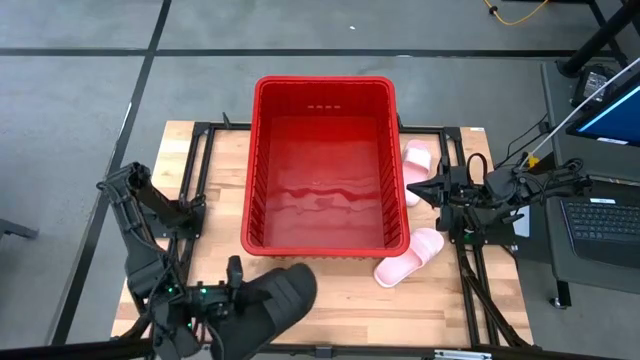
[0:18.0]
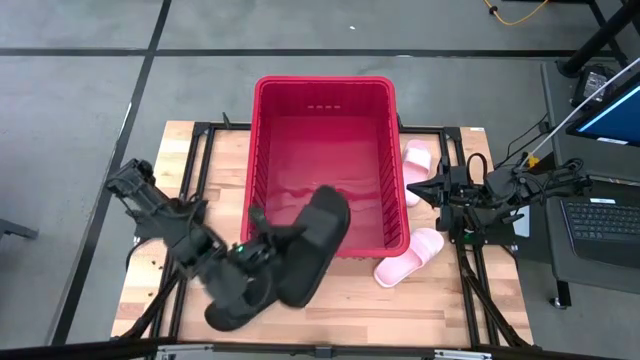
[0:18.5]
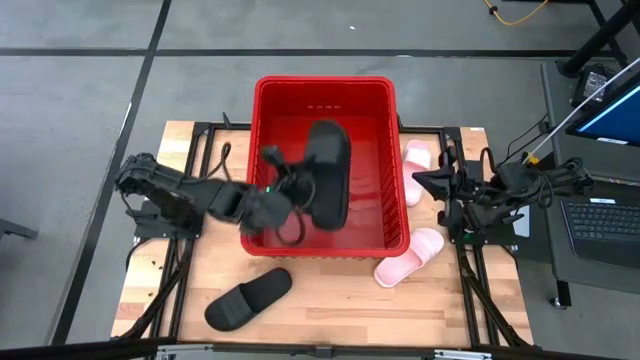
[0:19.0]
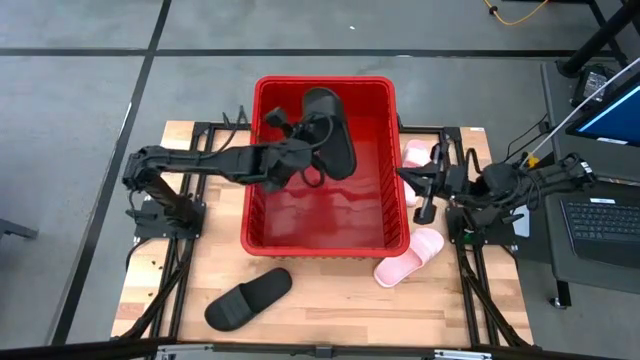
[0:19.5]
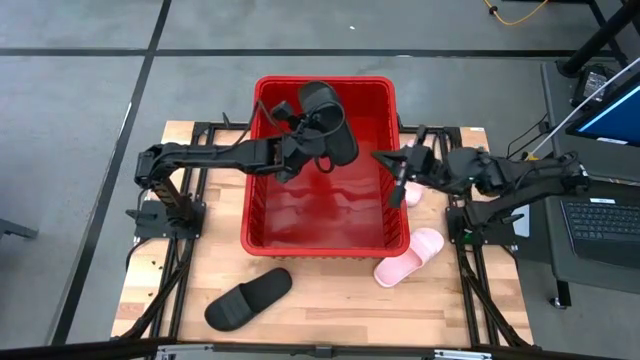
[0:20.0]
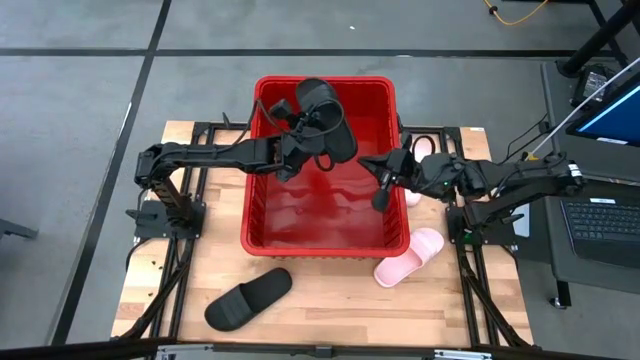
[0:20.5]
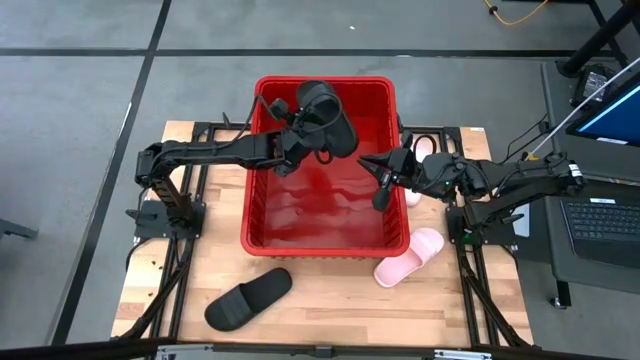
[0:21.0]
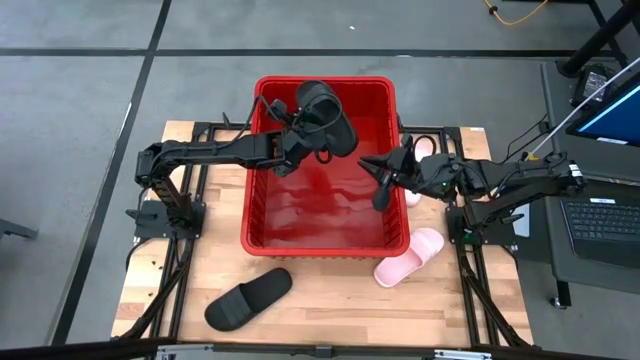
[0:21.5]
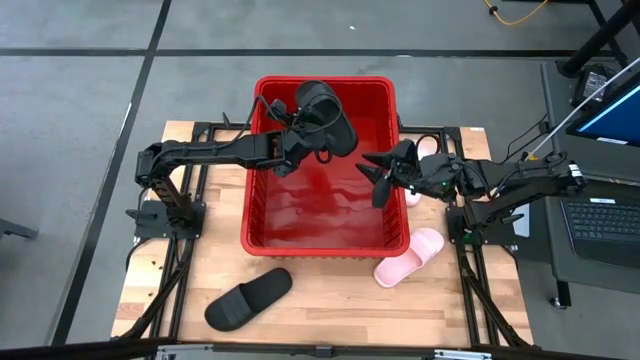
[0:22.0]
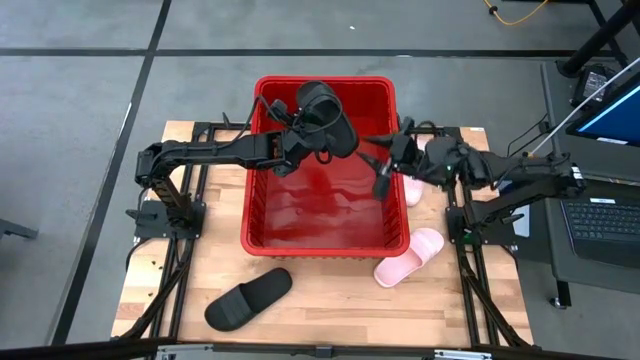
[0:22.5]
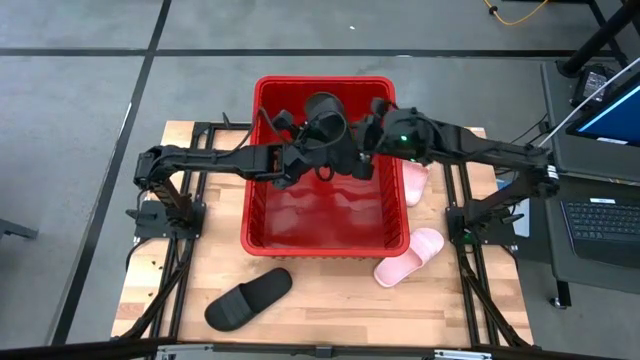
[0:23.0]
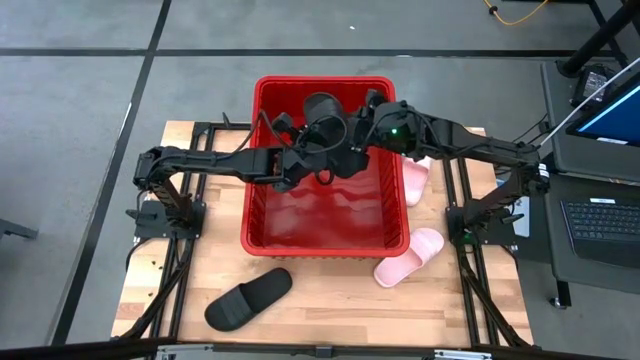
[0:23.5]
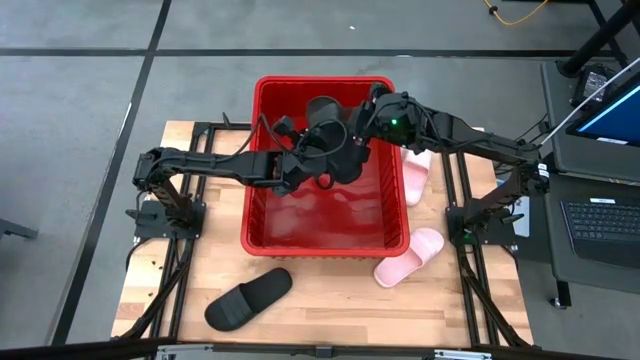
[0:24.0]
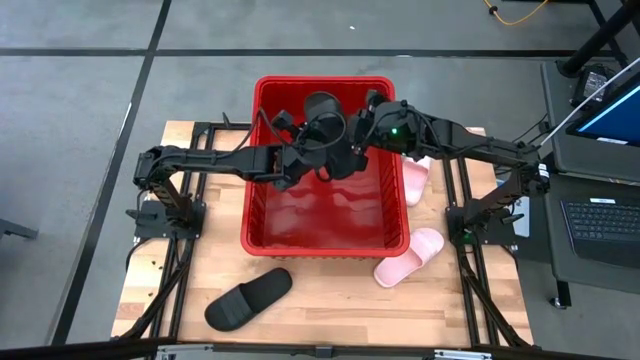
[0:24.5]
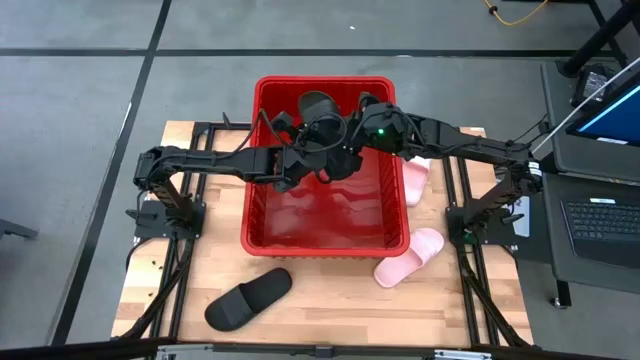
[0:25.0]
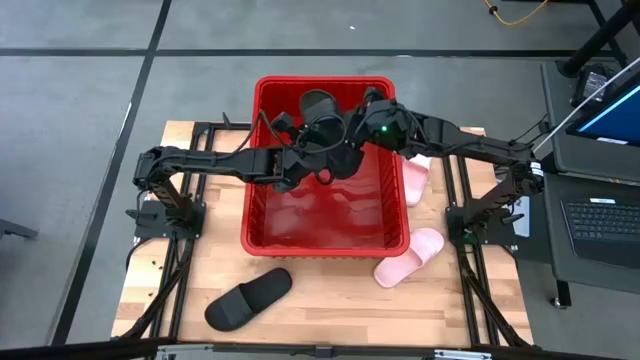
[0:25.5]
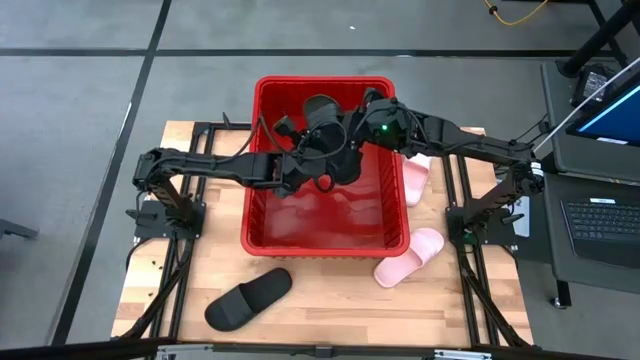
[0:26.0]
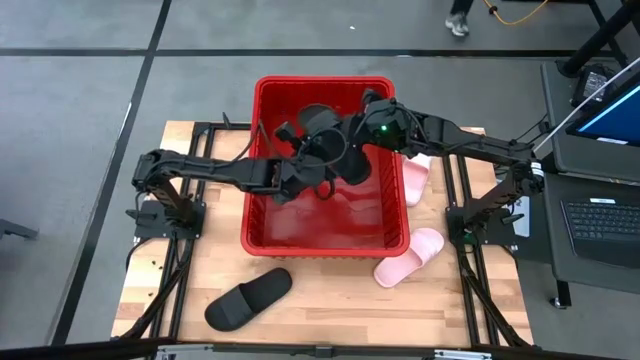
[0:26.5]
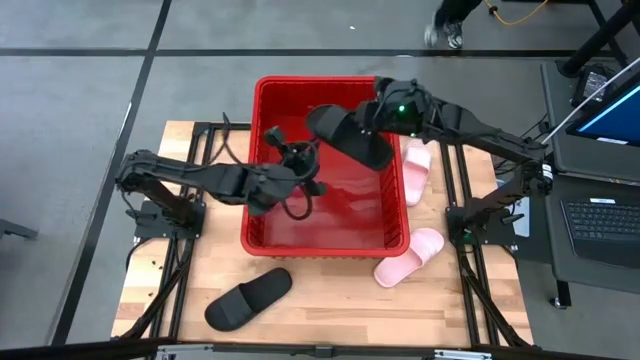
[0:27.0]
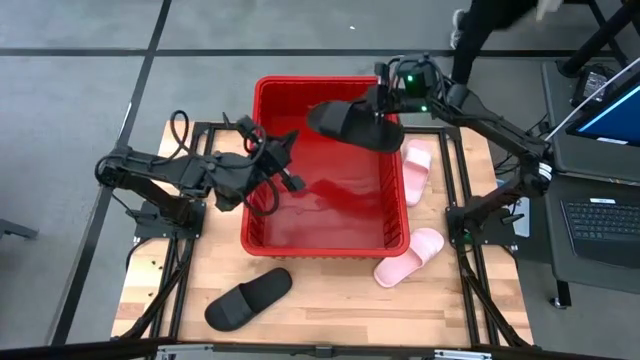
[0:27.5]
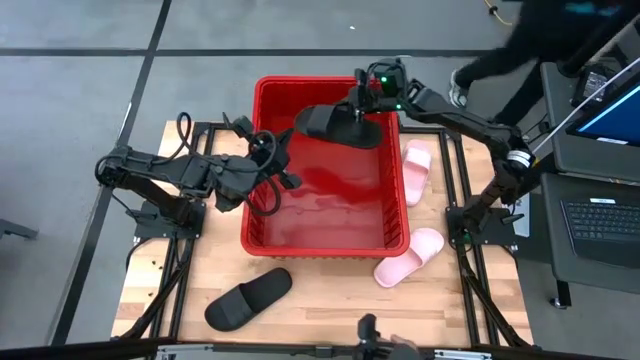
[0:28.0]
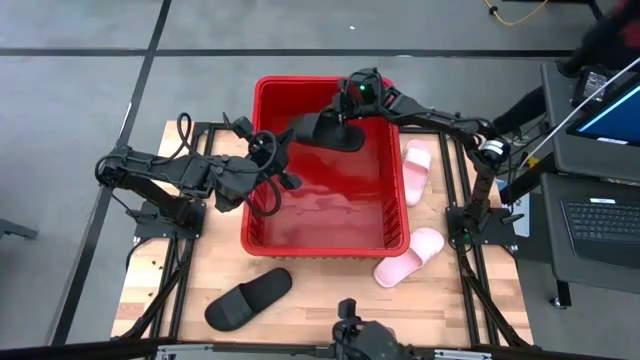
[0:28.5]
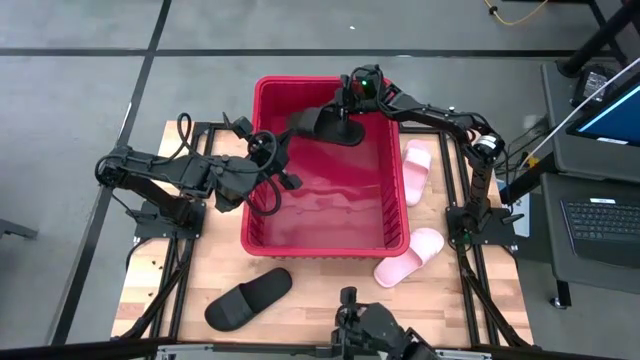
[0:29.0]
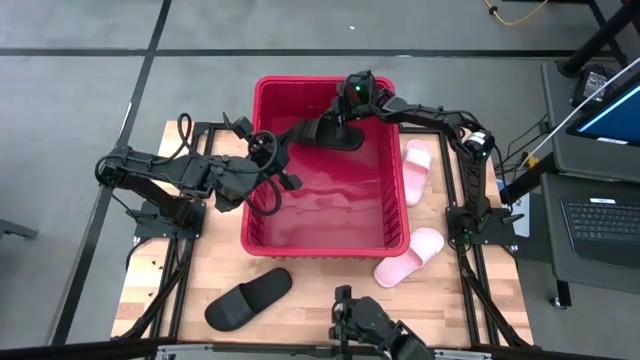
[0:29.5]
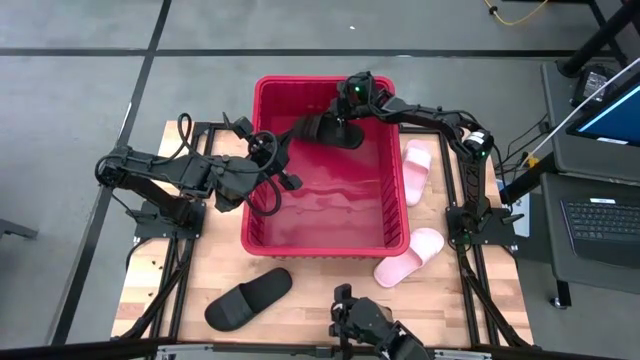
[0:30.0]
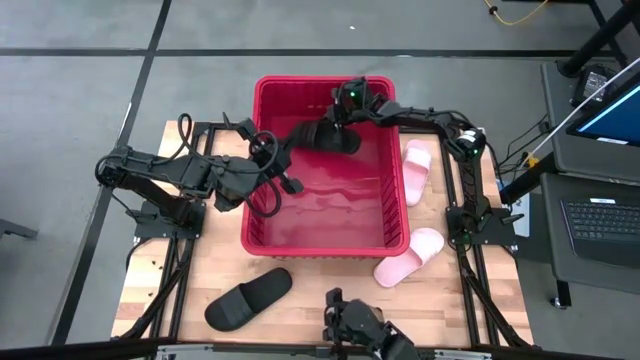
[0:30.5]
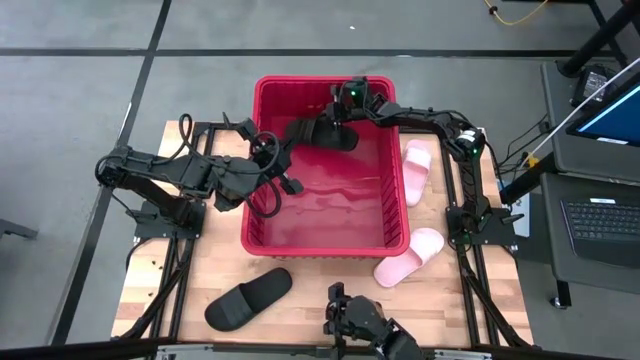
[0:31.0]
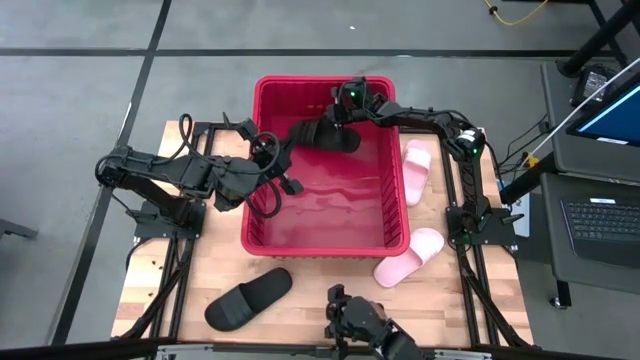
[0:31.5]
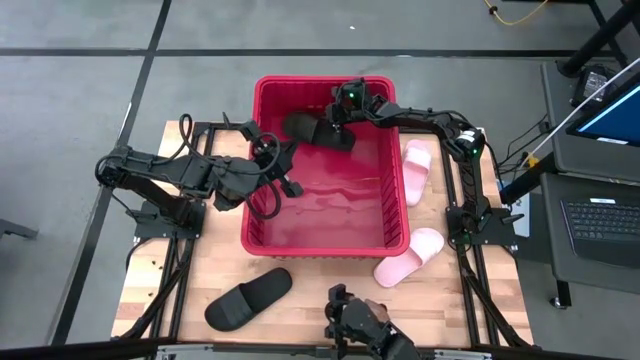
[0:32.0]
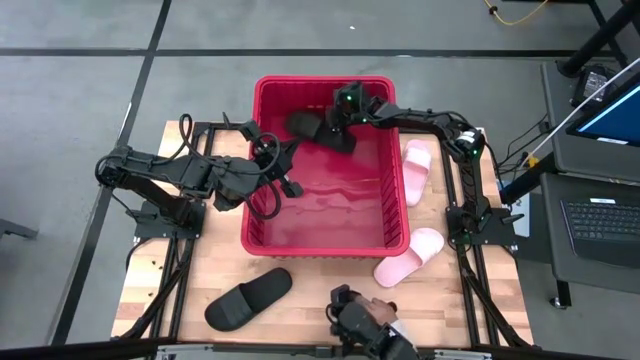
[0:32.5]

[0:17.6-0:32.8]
Task: Pick and place slides into bin
Put the top left black slide into the red bin

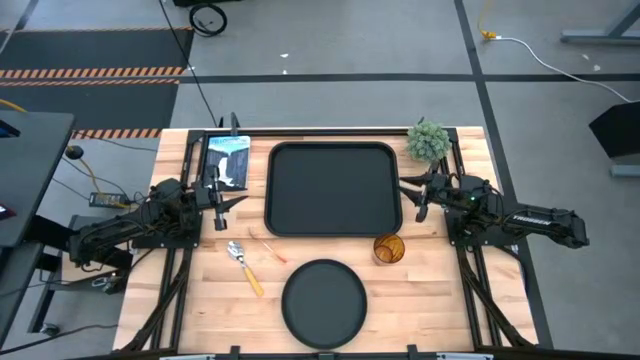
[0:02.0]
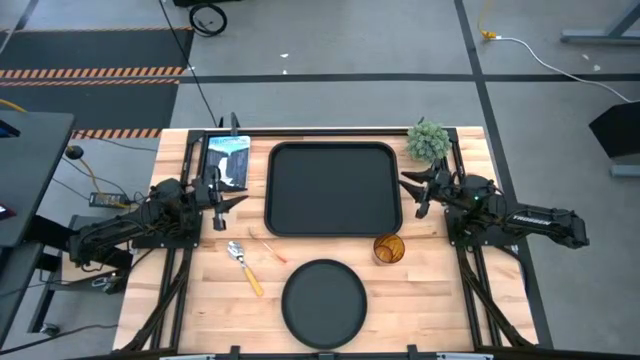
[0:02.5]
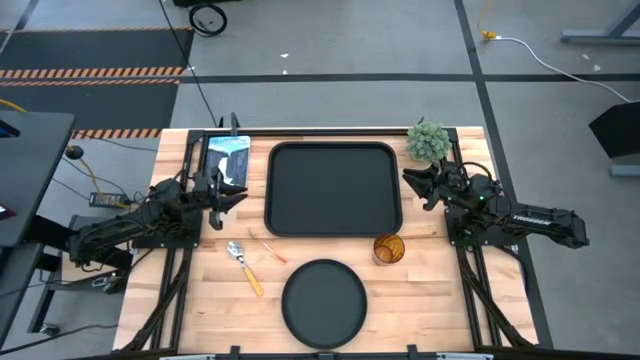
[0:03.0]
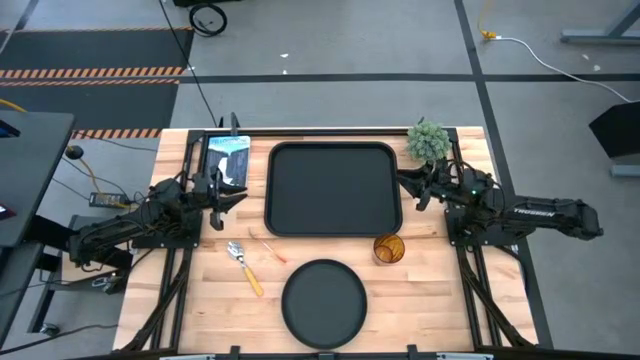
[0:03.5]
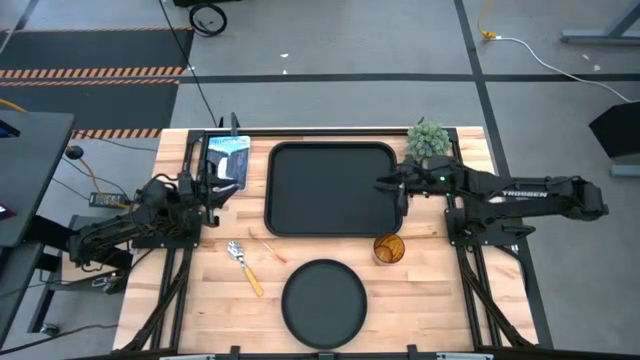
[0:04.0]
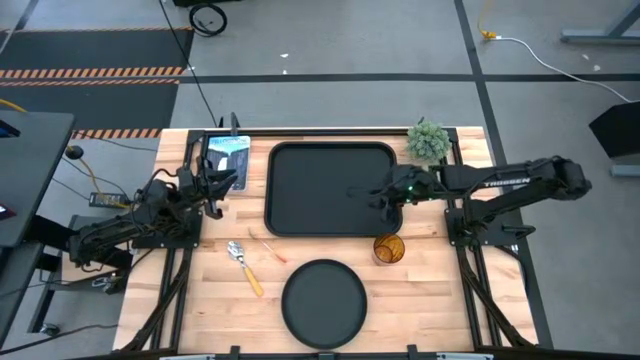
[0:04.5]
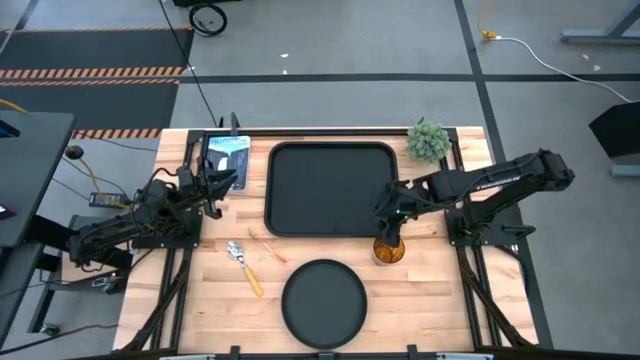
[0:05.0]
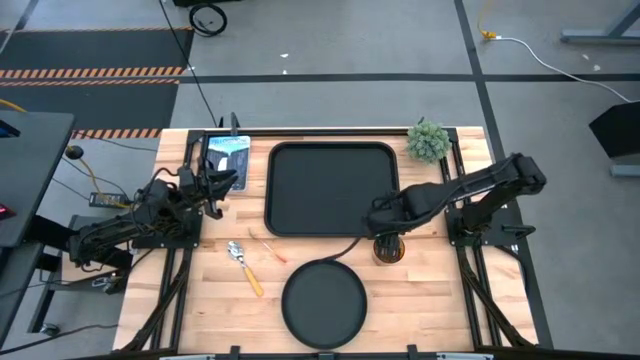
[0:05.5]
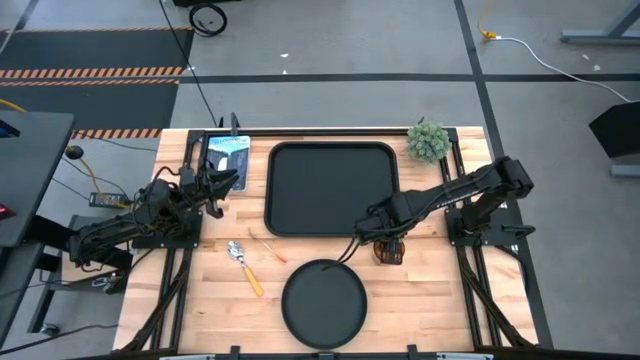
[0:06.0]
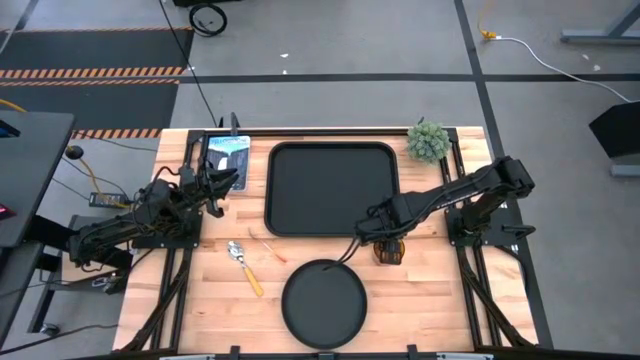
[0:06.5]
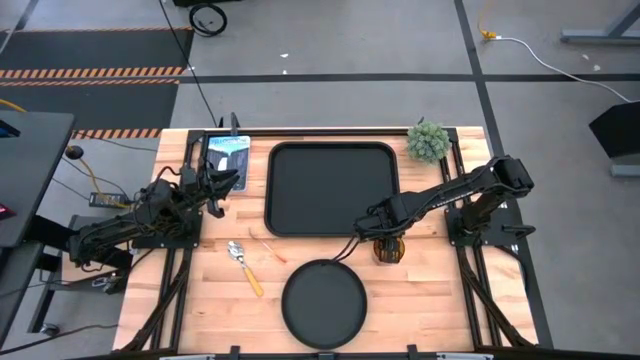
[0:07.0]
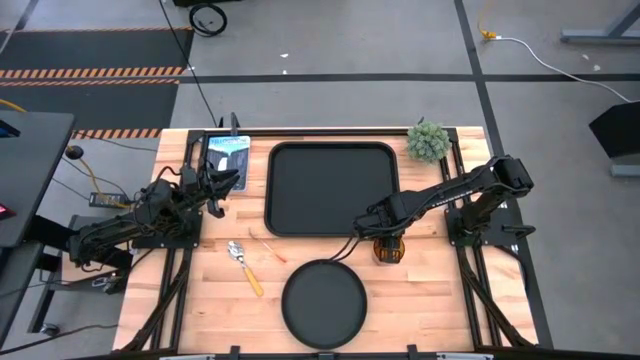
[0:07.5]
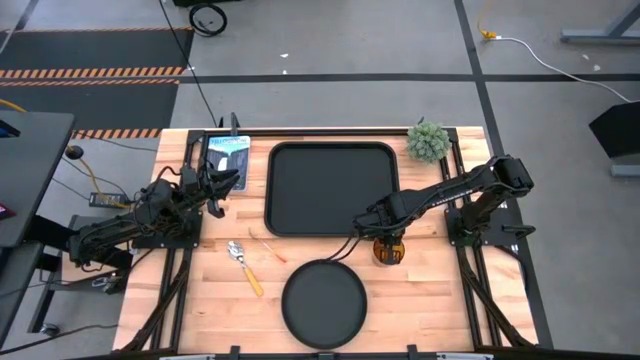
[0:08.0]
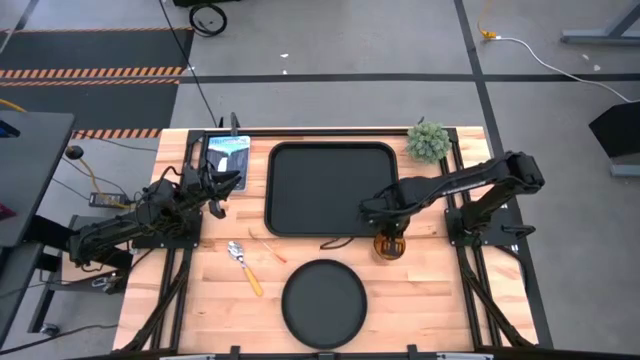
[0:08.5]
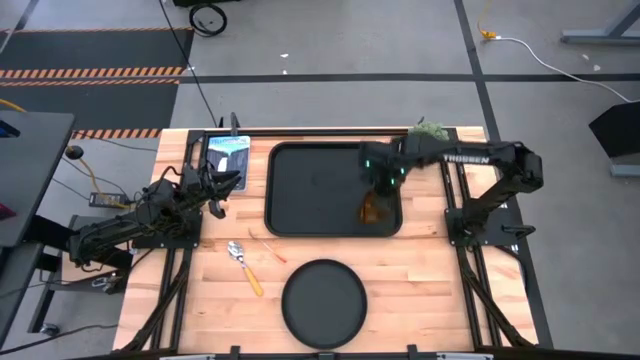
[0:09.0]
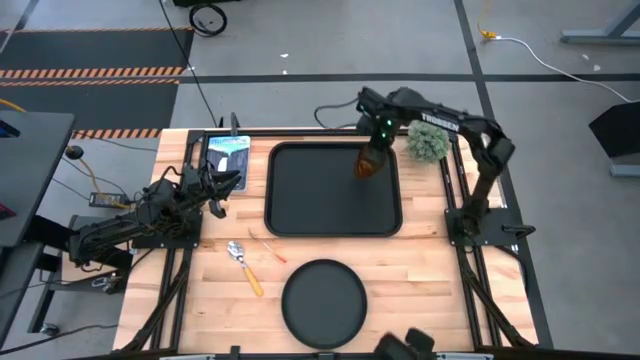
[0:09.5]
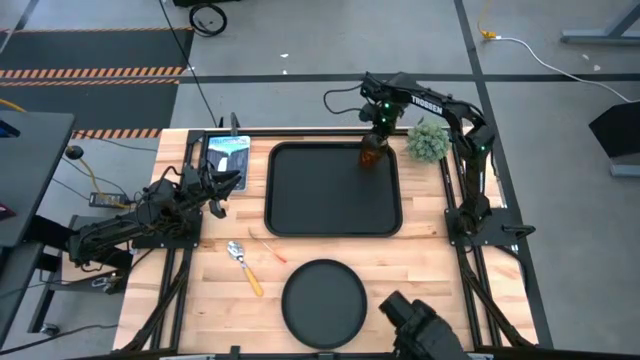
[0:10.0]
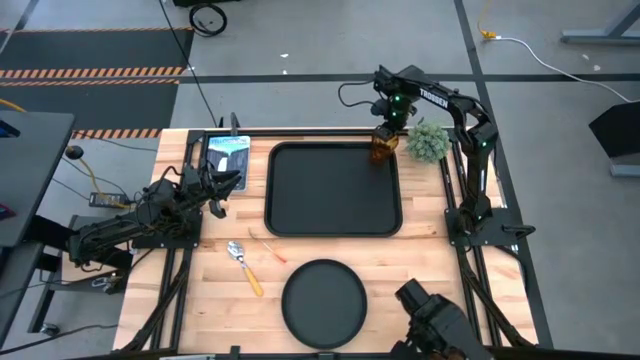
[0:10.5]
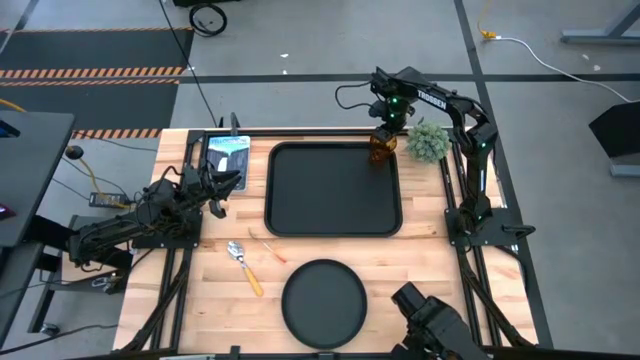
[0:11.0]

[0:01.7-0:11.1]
Task: Pick and place plate/cup/fork/spoon on tray
Put the brown cup on the black tray
